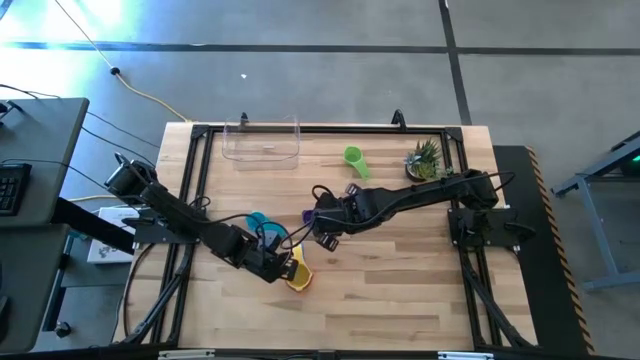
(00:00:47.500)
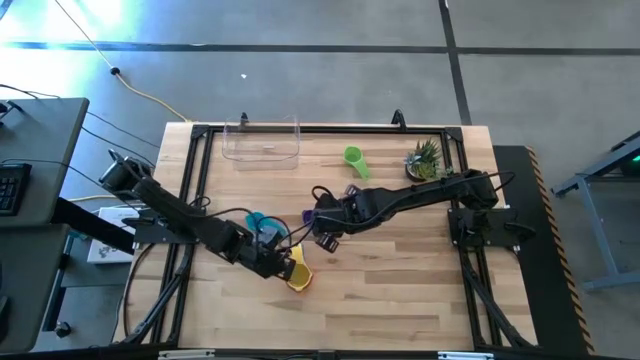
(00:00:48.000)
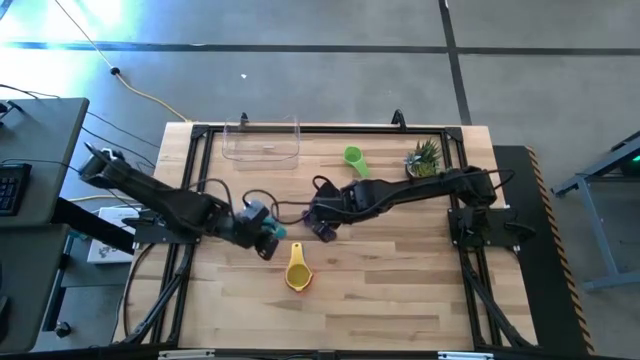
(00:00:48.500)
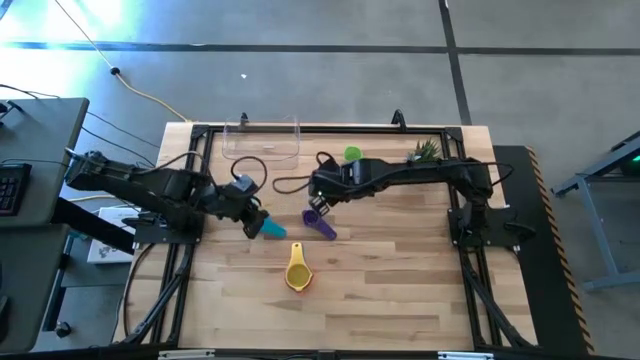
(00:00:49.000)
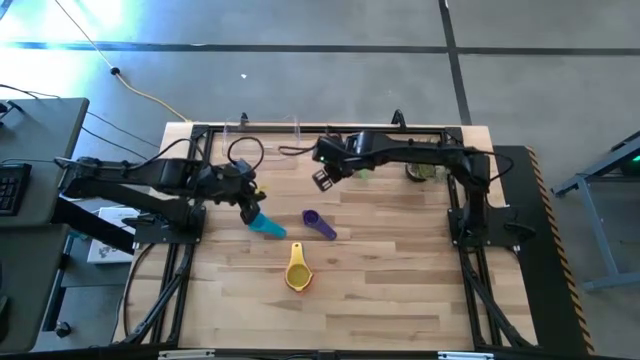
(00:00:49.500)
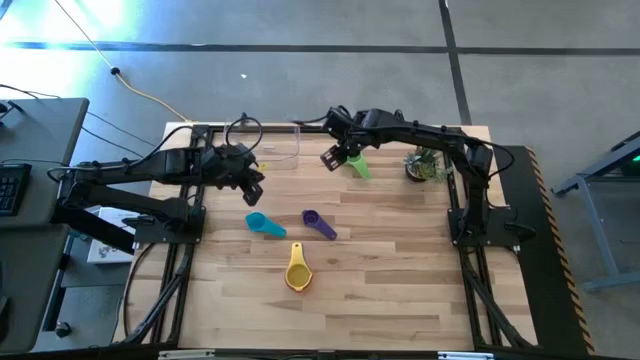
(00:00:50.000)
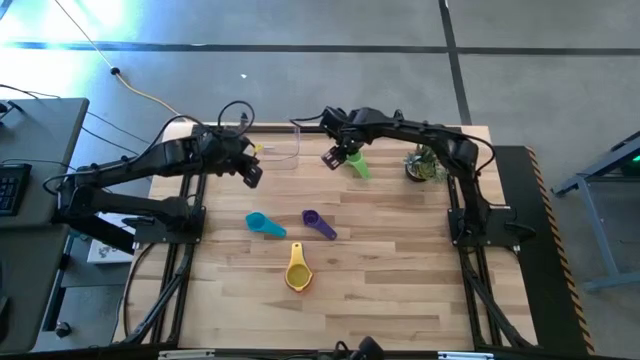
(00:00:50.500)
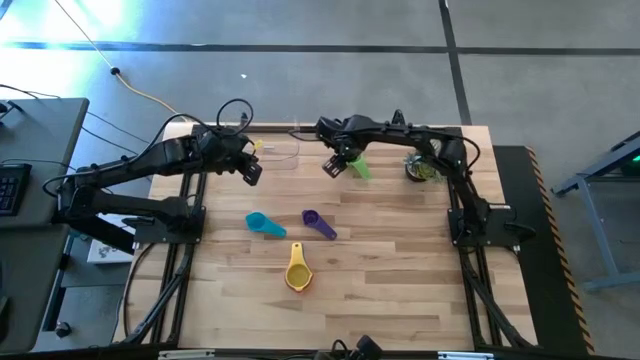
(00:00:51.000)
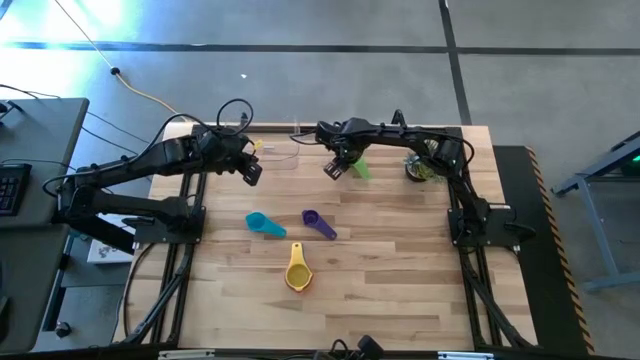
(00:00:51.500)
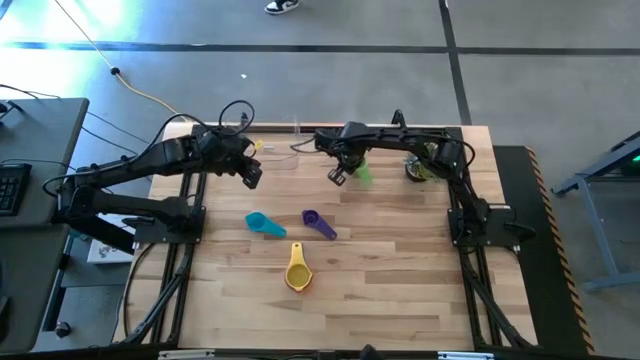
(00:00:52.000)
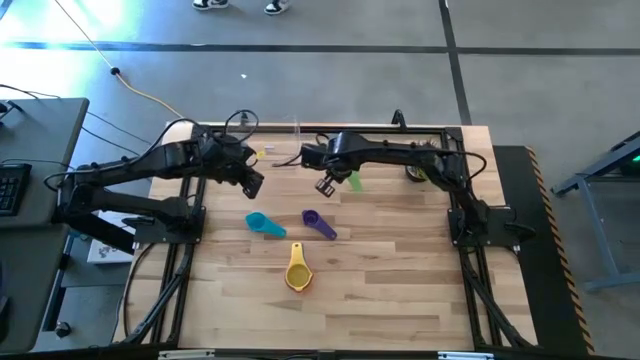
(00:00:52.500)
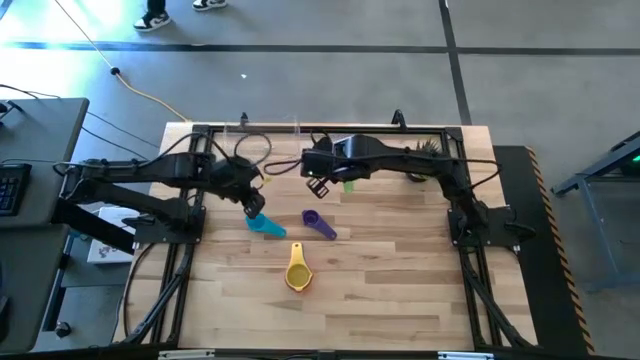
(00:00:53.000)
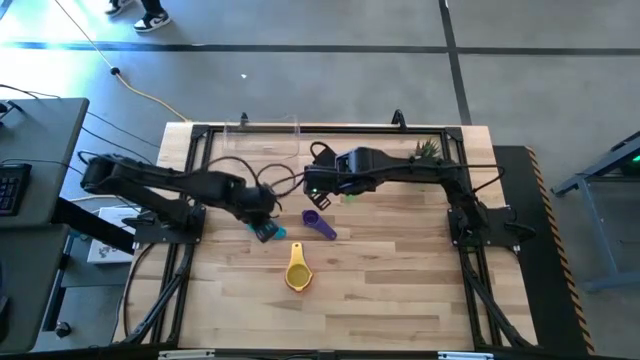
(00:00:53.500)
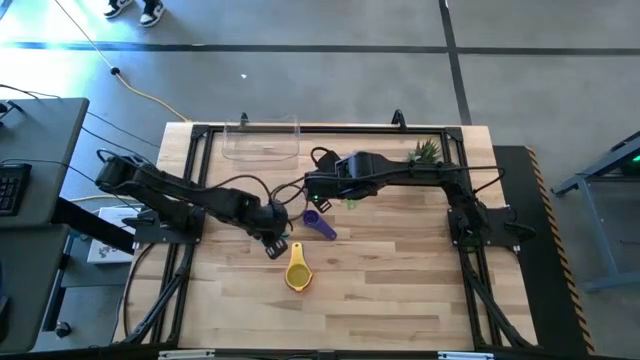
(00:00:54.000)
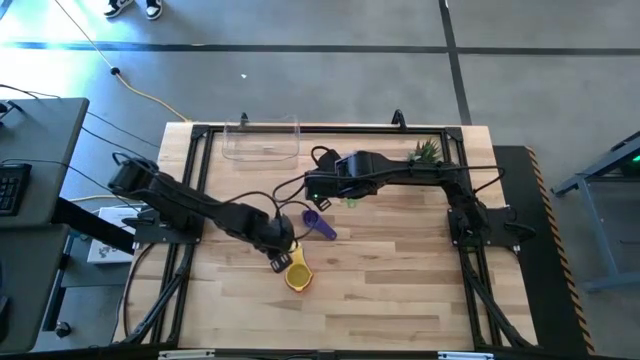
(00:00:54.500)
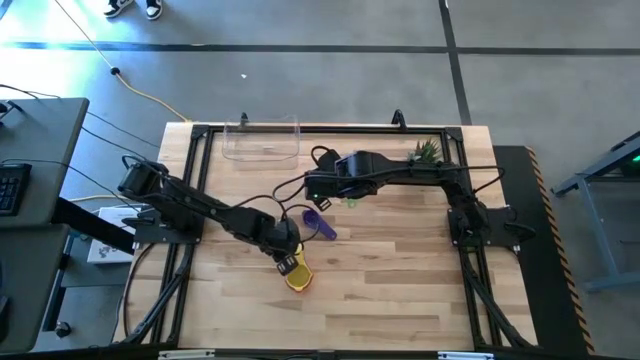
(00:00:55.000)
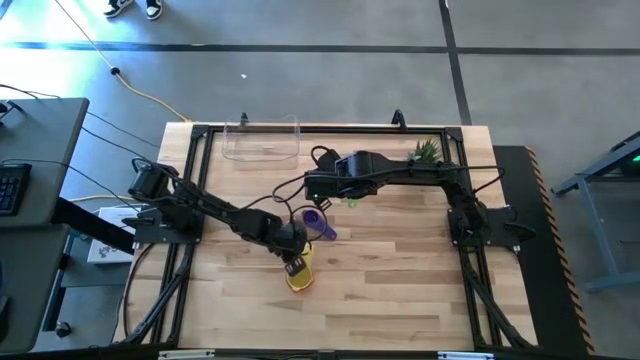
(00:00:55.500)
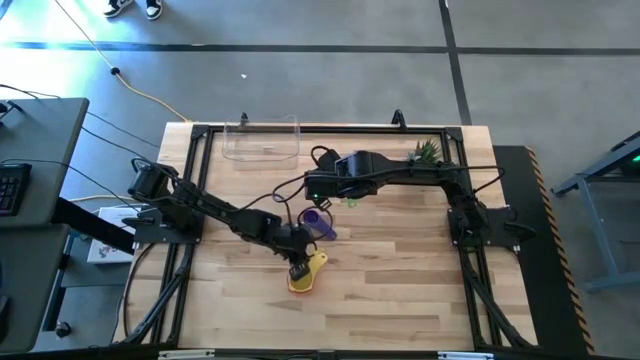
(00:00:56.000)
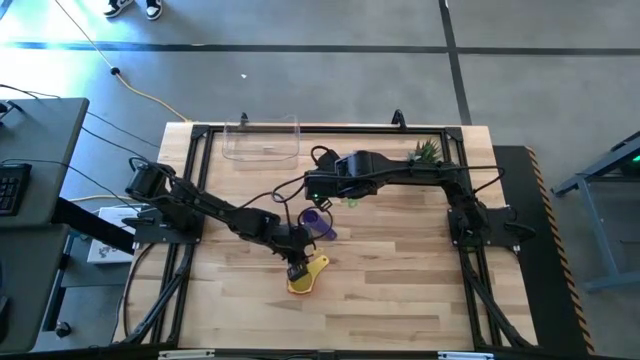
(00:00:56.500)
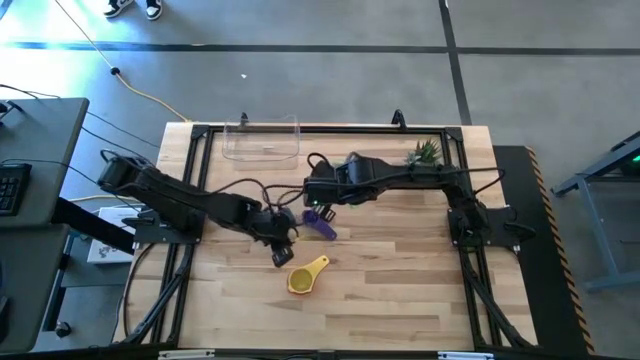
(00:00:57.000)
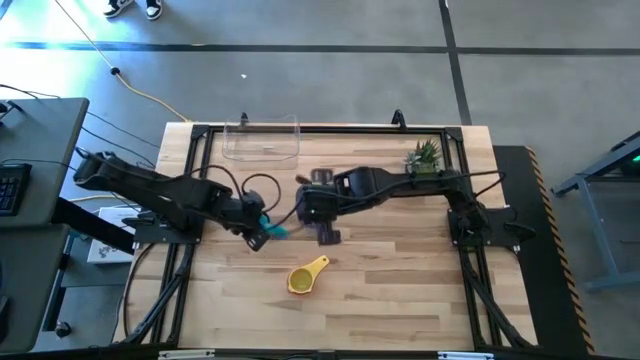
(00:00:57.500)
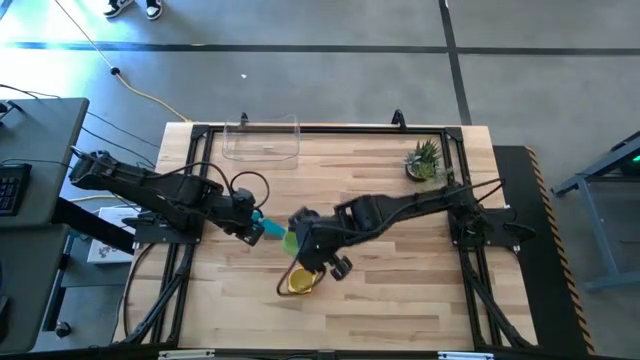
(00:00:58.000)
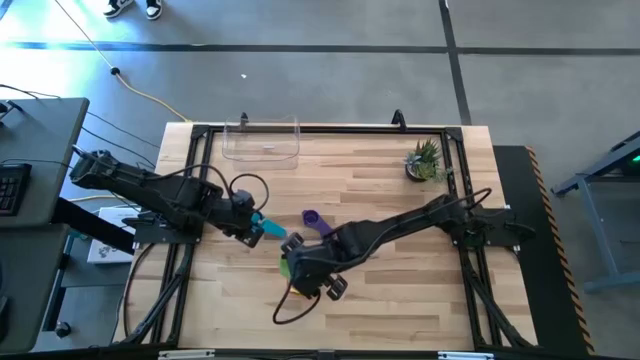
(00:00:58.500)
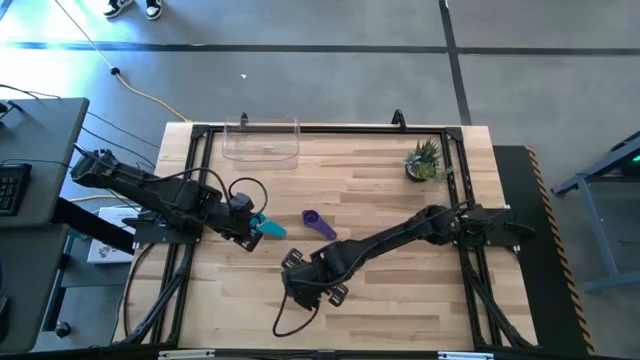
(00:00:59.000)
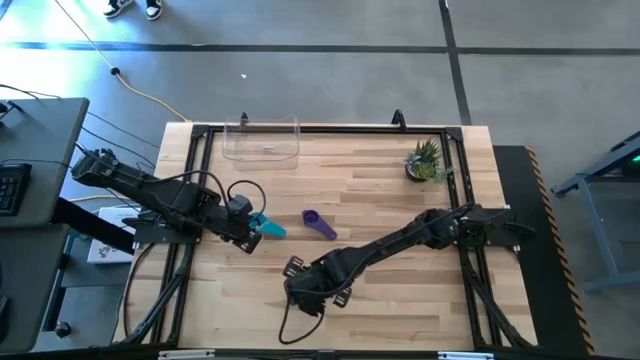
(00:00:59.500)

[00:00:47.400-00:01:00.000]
Task: Nest measuring cups in basket
Stack the green measuring cup on the yellow measuring cup

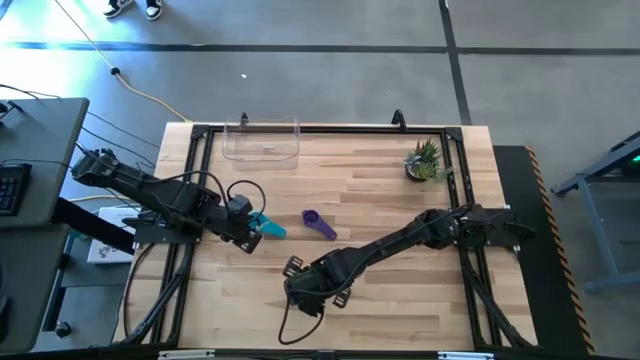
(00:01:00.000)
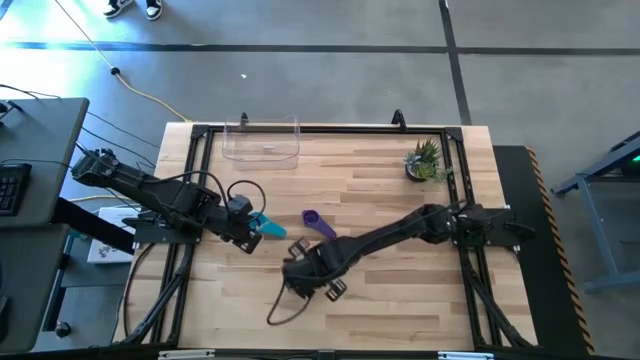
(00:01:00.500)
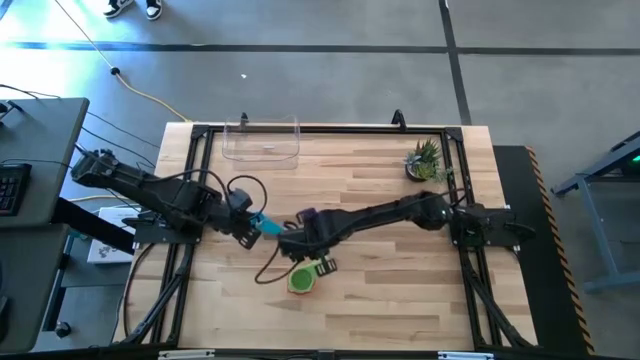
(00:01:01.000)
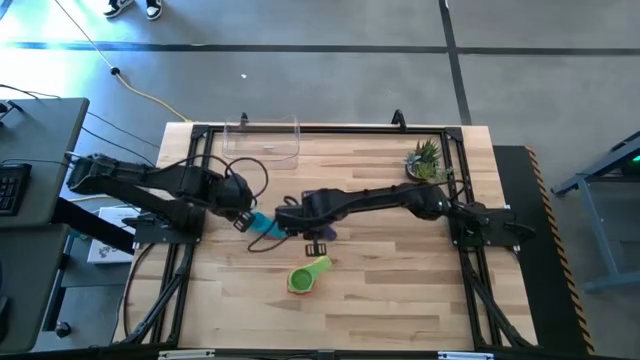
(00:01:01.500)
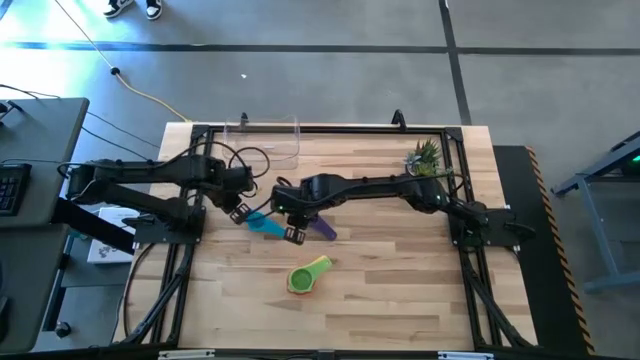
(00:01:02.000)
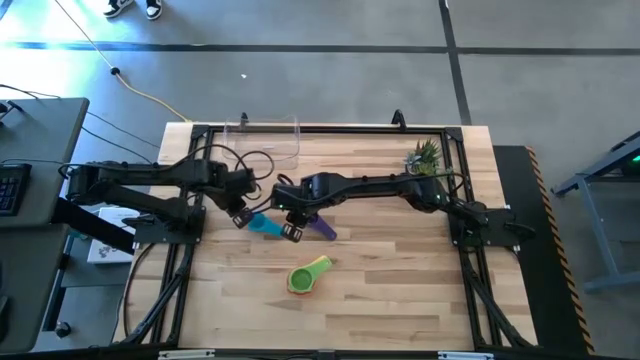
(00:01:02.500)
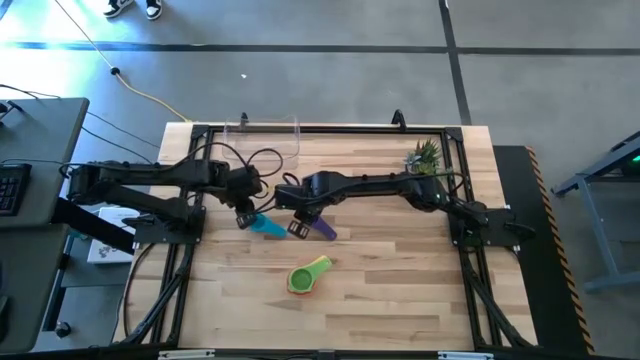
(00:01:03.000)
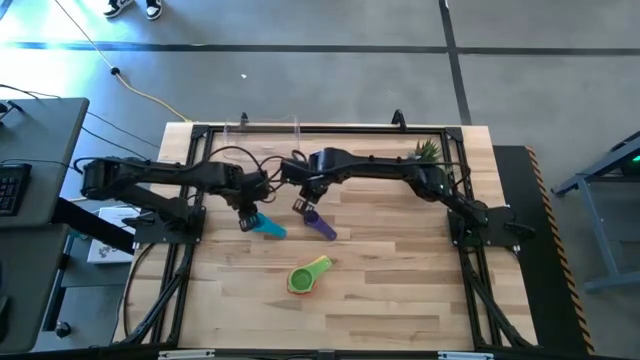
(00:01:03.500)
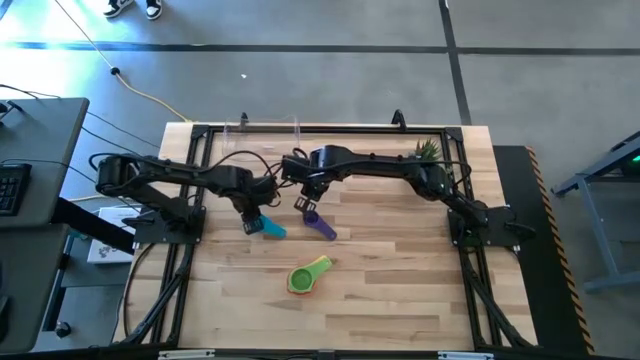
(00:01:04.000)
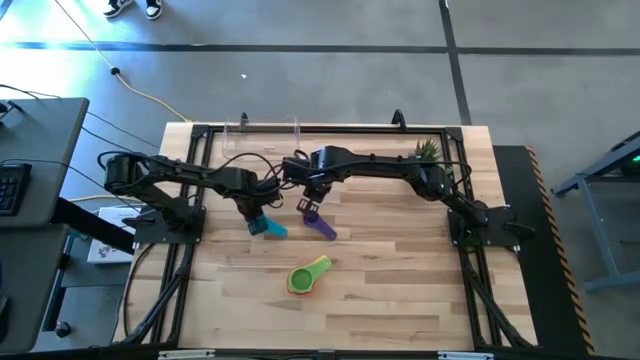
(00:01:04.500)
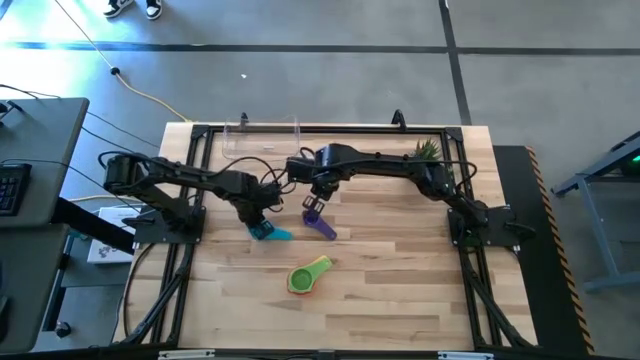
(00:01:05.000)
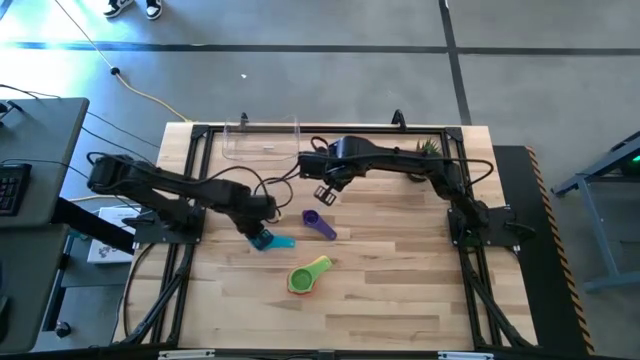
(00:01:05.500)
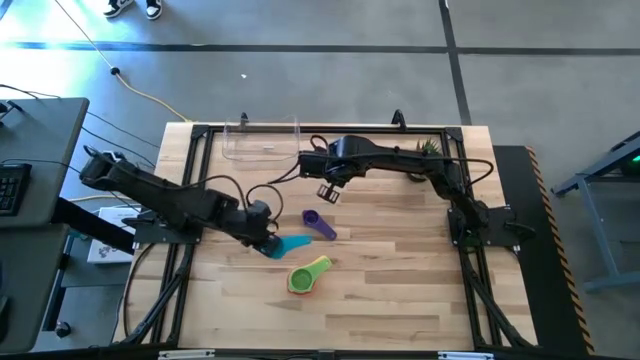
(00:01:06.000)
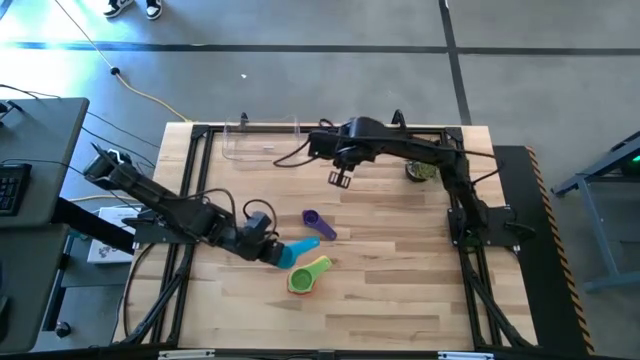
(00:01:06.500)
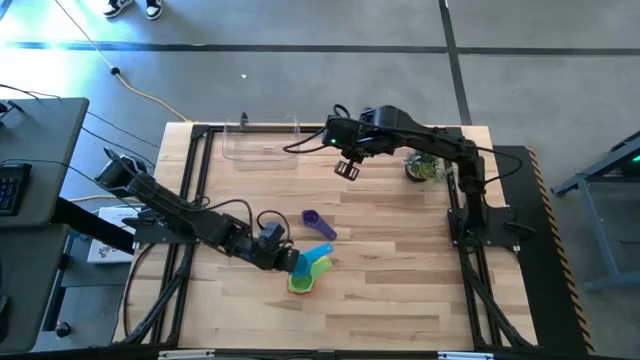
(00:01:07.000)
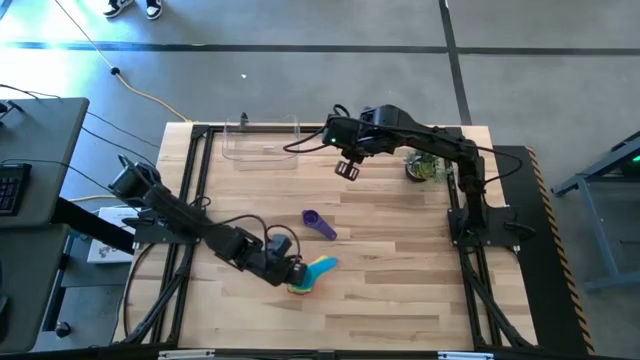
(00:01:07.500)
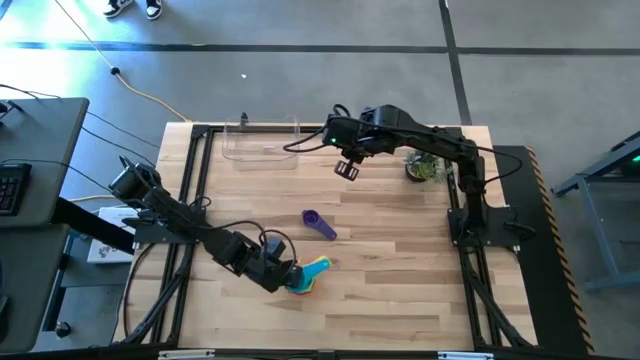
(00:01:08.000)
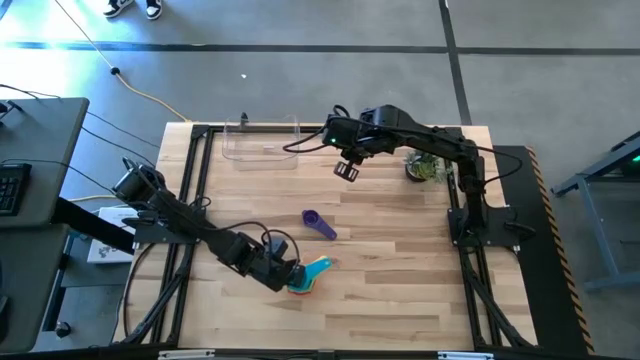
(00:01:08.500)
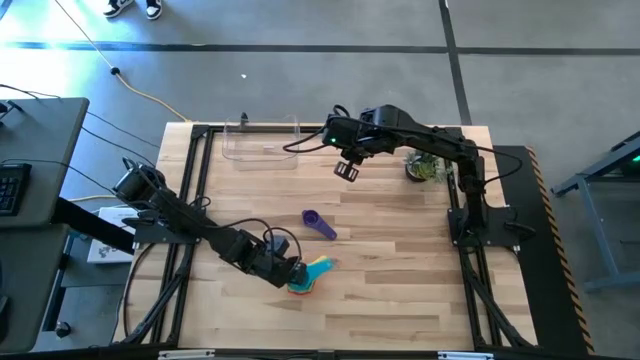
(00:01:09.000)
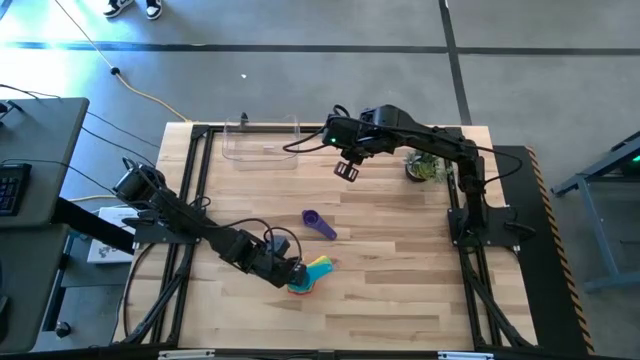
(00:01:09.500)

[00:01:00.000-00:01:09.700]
Stack the light blue measuring cup on the green measuring cup
